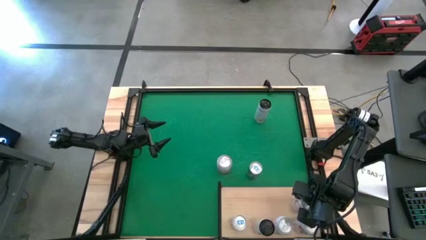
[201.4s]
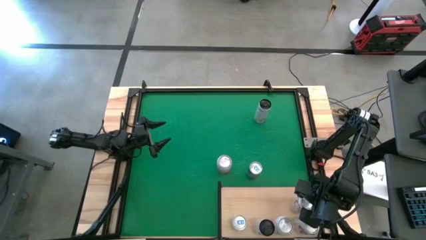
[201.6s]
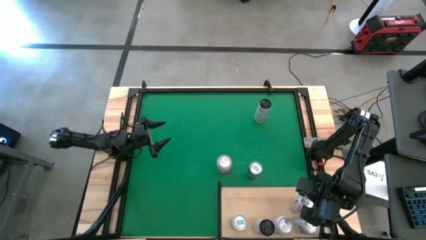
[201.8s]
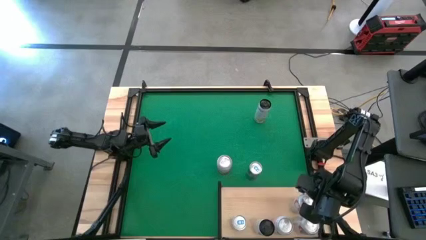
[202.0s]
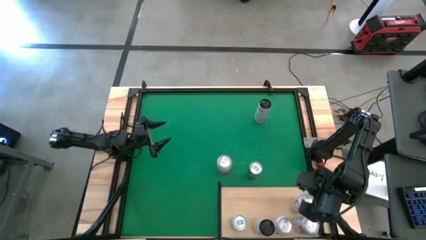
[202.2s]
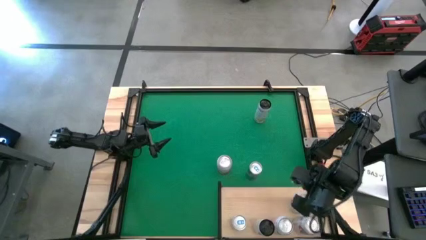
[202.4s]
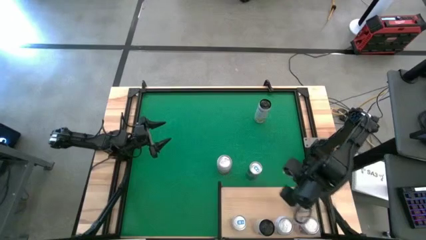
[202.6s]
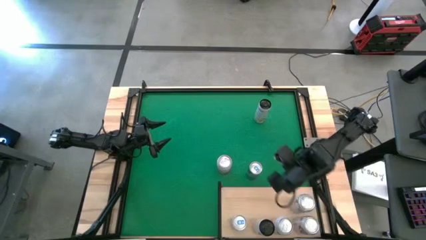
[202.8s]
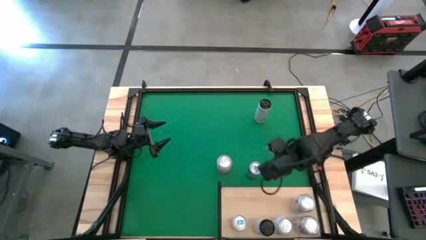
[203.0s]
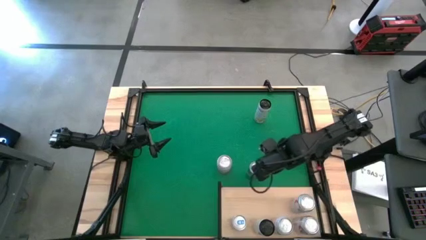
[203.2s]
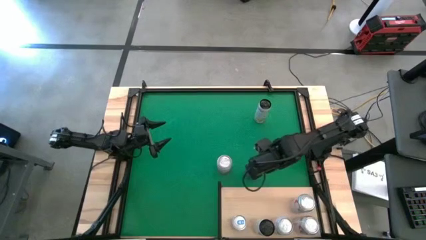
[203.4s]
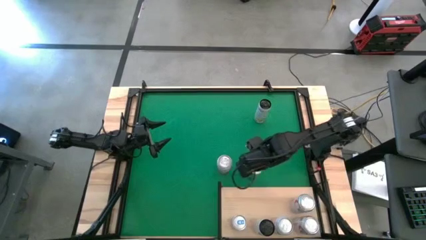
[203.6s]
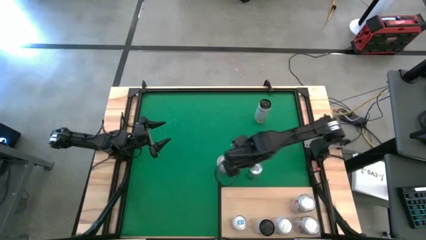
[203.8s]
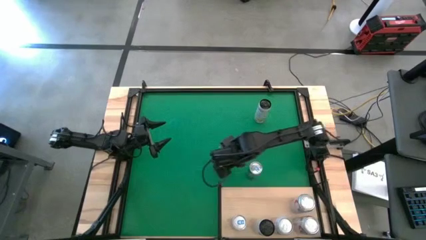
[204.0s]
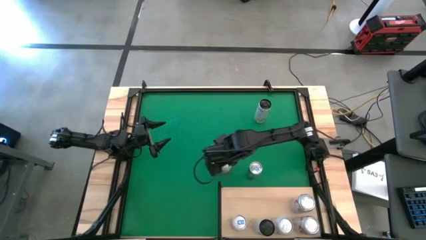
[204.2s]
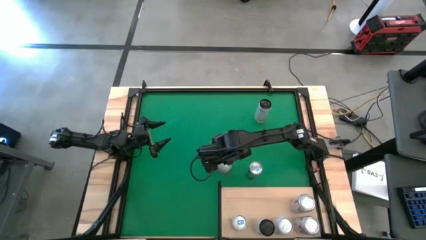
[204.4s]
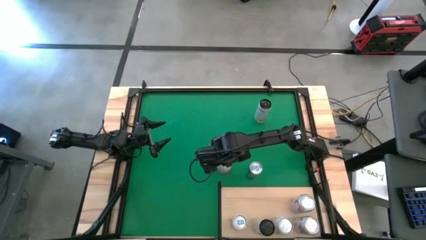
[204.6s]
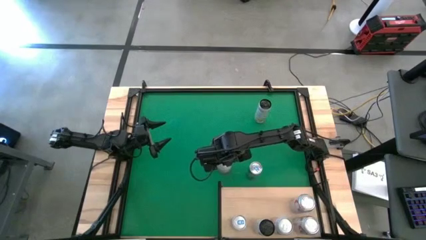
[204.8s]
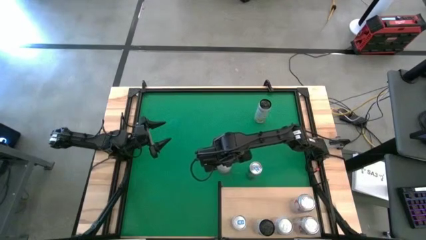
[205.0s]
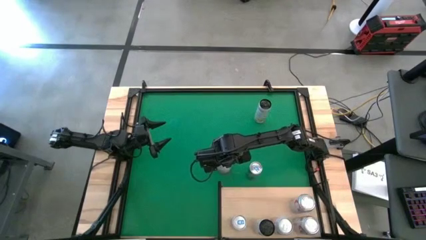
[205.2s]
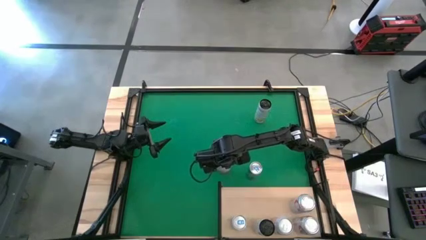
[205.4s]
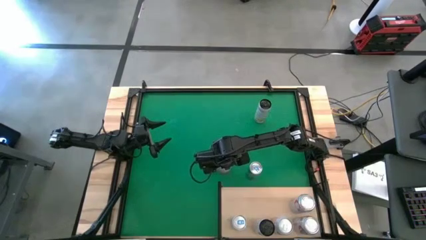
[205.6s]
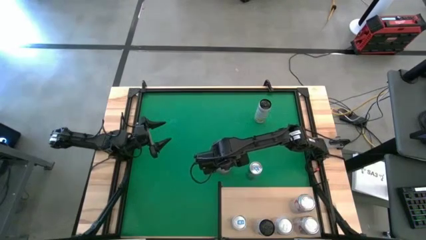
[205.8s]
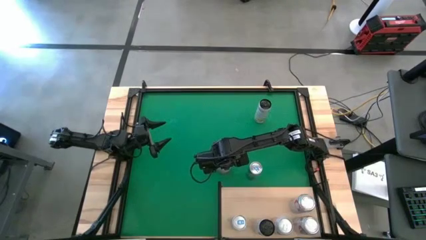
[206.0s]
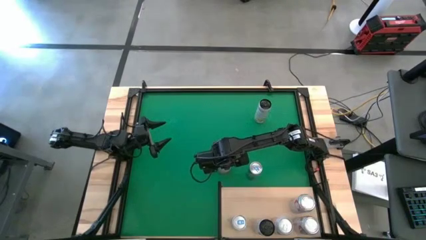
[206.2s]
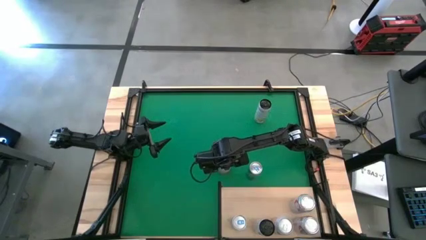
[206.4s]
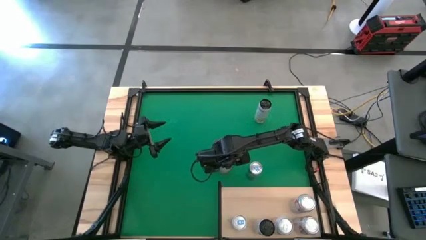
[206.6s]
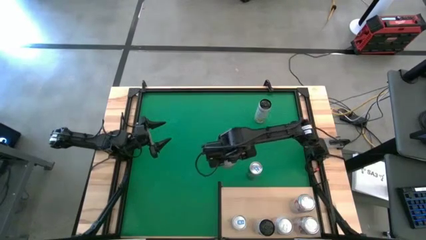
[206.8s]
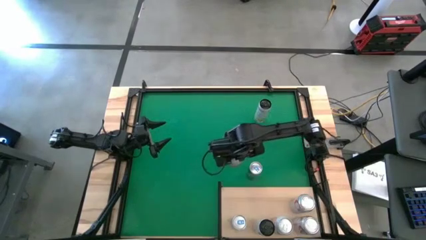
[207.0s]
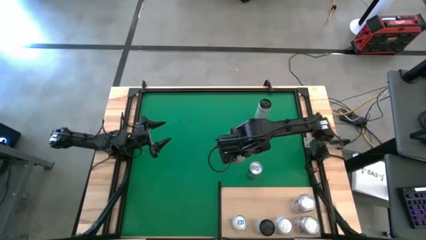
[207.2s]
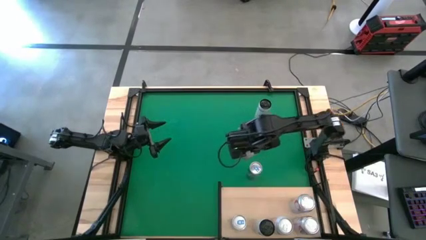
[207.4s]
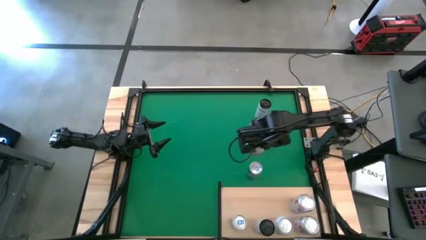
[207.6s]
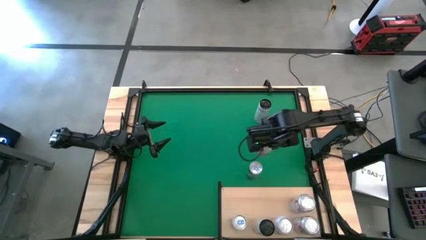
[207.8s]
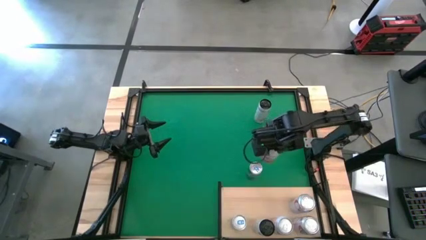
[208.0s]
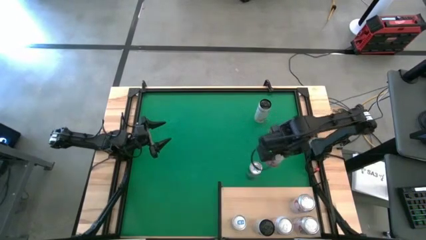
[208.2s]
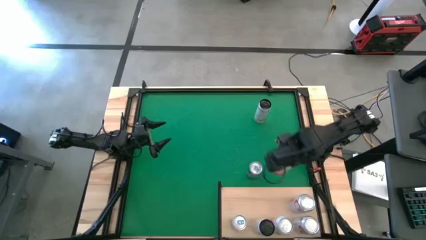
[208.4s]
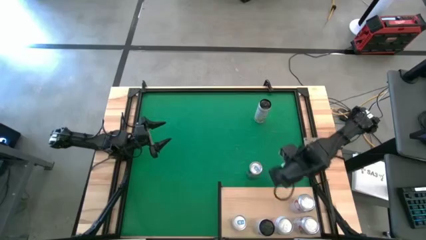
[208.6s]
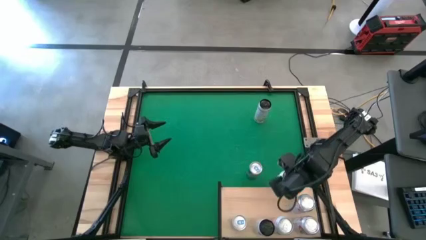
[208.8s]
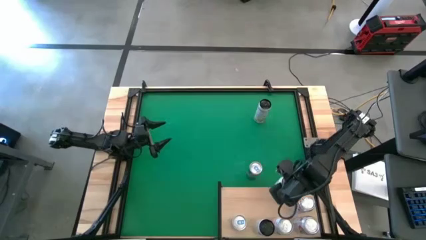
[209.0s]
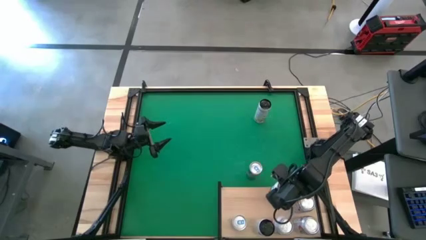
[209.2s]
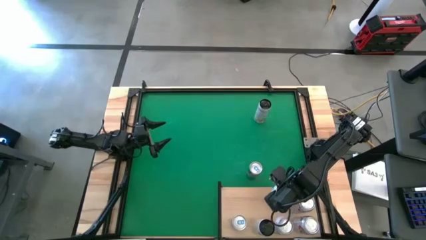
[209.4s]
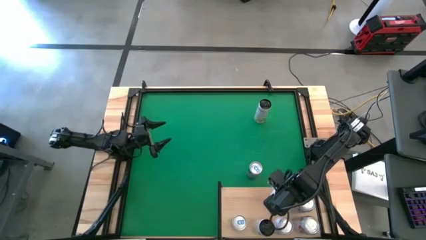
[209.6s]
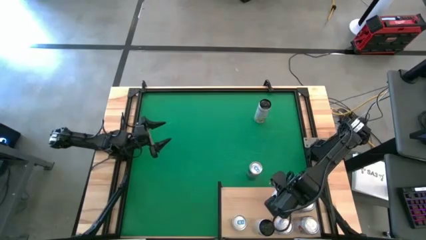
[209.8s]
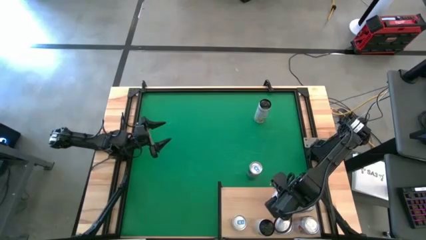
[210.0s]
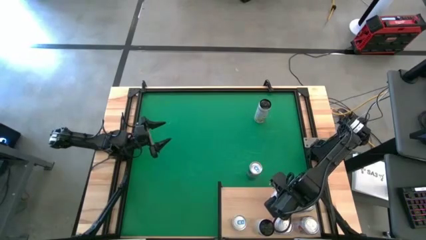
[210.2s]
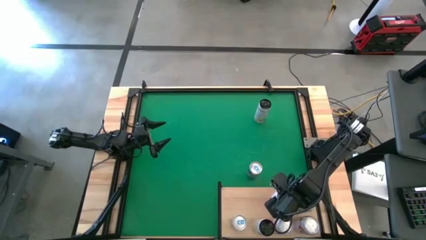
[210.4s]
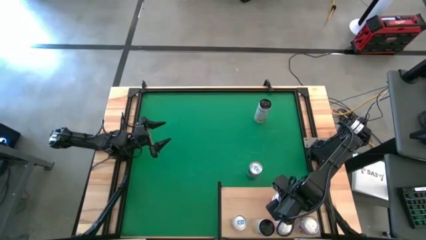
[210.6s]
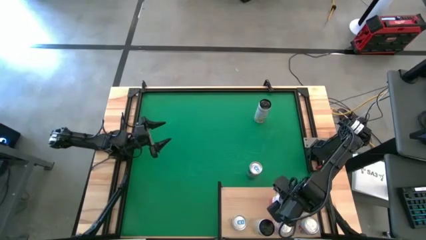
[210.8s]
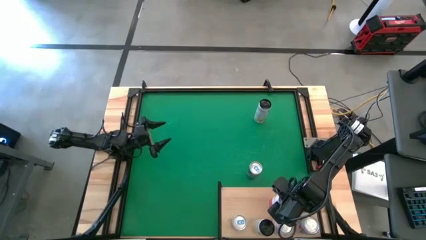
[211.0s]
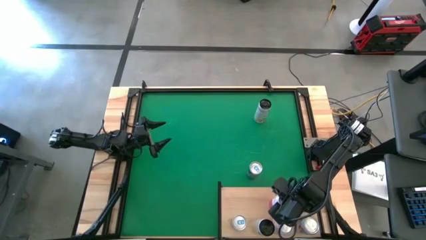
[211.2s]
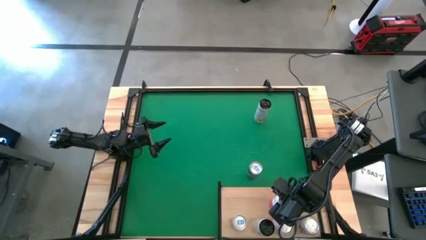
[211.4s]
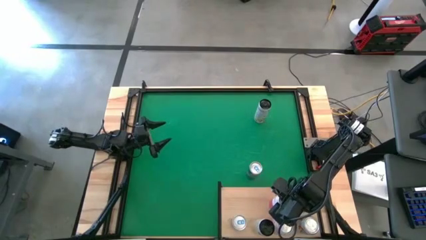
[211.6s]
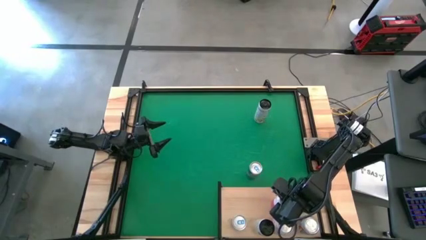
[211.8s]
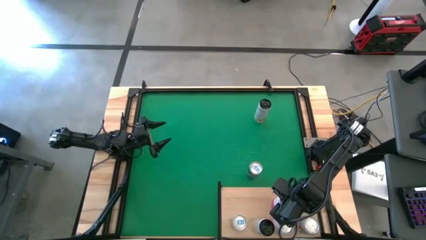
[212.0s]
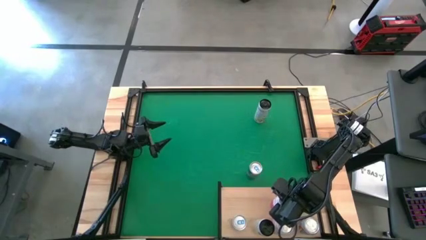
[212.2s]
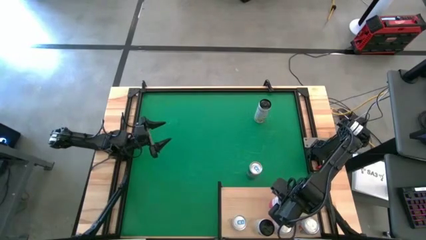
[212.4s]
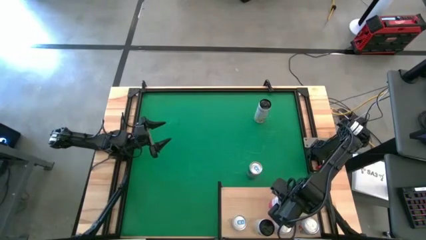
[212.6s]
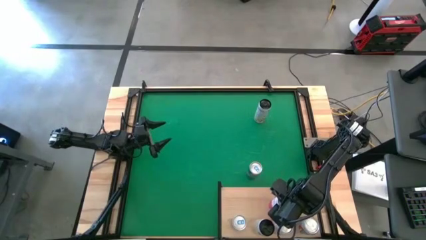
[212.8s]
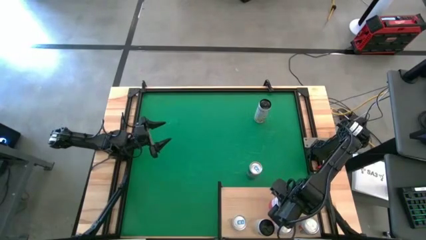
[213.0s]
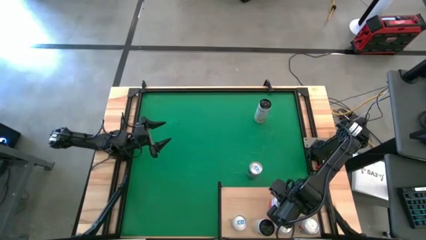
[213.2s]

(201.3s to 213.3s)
Task: Place canned beverage on shelf
Put the pink-white soda can aligned with the pink-white soda can on the shelf

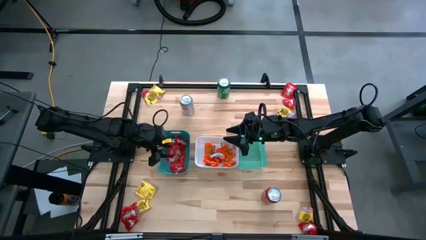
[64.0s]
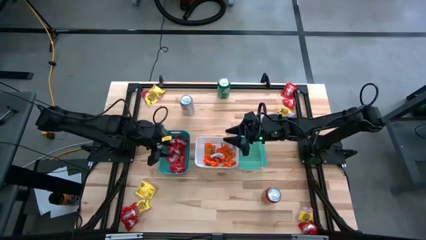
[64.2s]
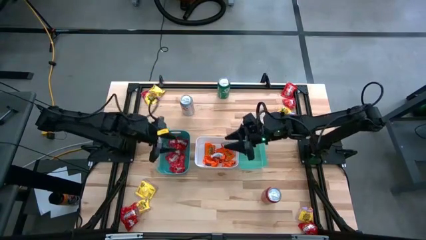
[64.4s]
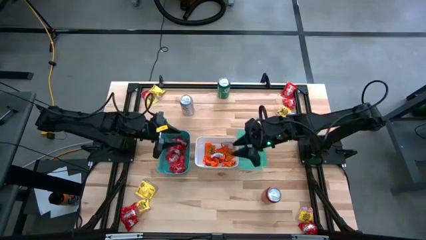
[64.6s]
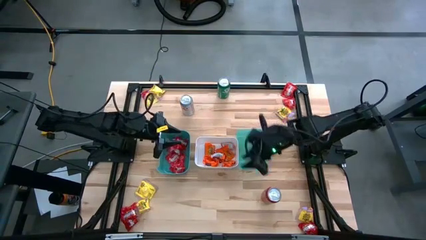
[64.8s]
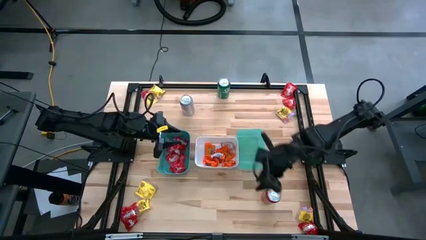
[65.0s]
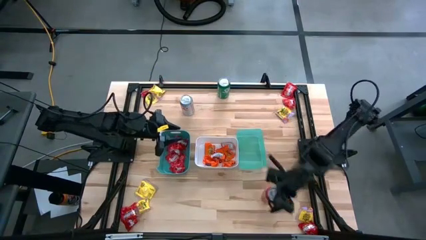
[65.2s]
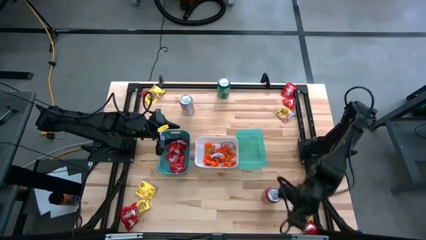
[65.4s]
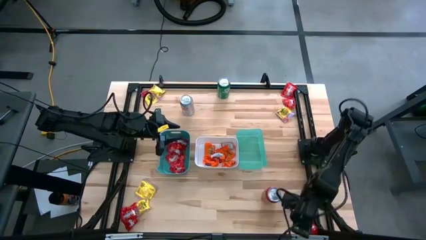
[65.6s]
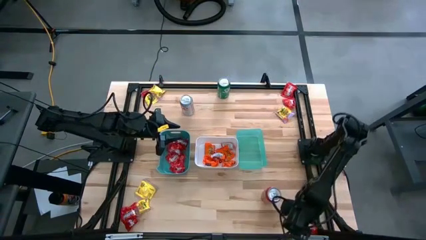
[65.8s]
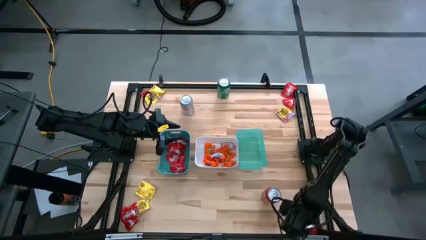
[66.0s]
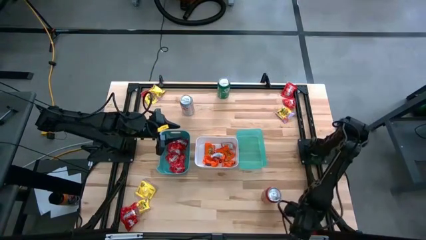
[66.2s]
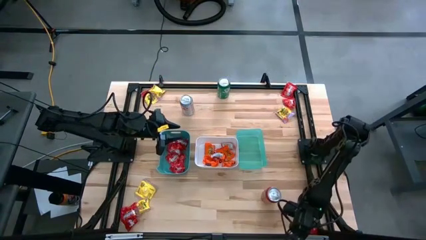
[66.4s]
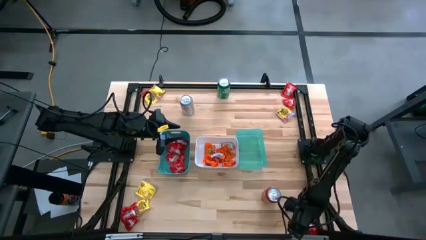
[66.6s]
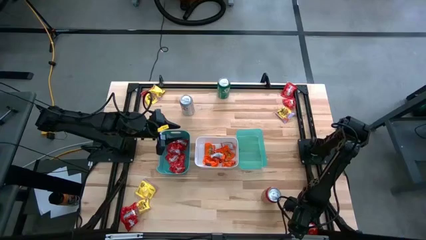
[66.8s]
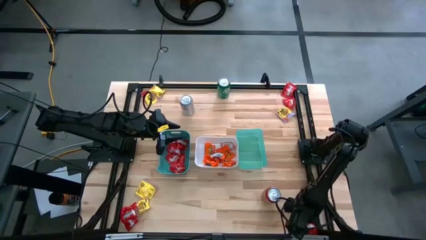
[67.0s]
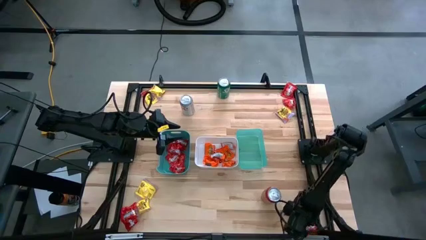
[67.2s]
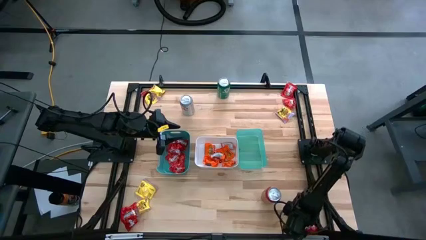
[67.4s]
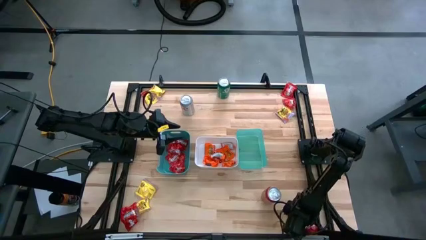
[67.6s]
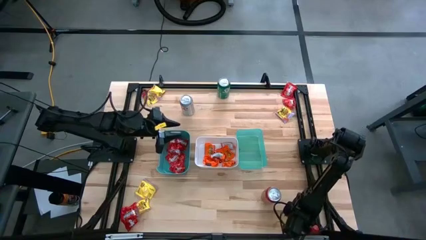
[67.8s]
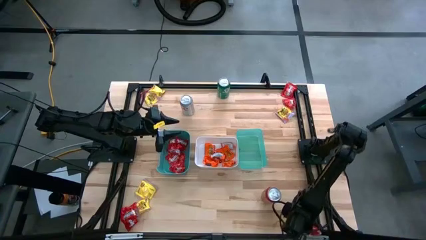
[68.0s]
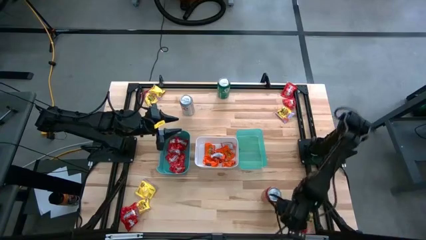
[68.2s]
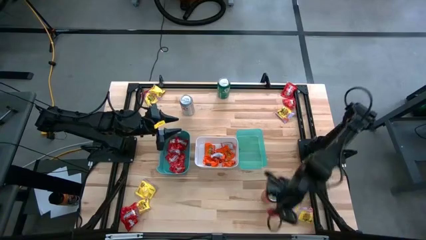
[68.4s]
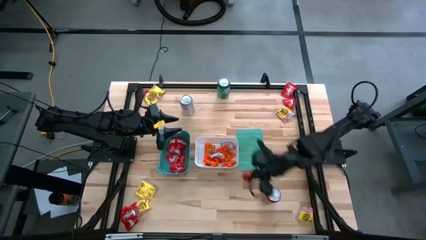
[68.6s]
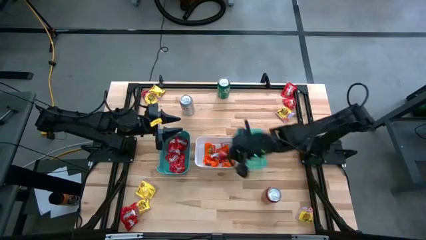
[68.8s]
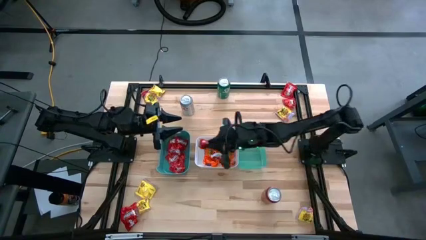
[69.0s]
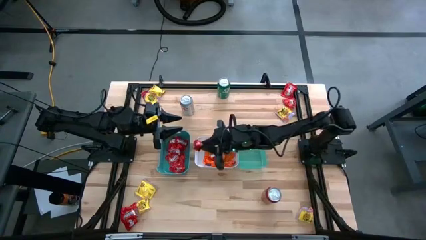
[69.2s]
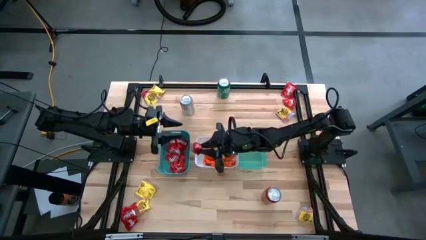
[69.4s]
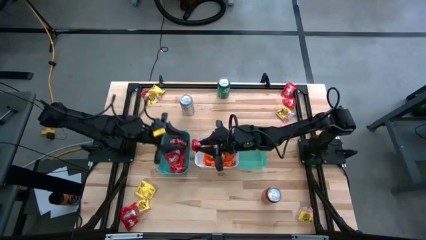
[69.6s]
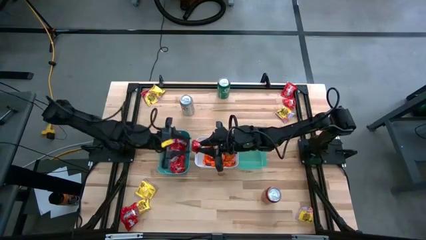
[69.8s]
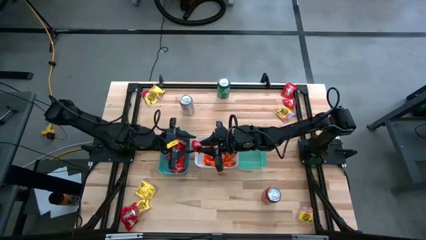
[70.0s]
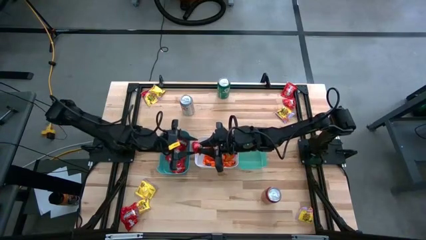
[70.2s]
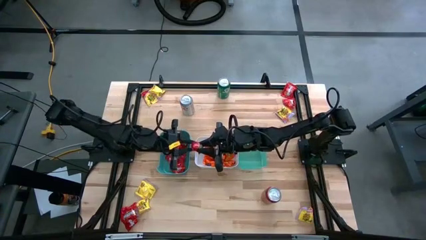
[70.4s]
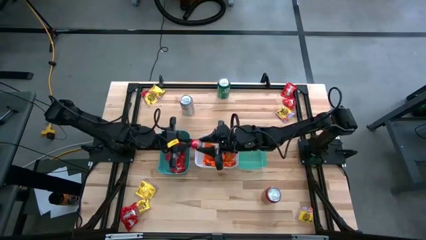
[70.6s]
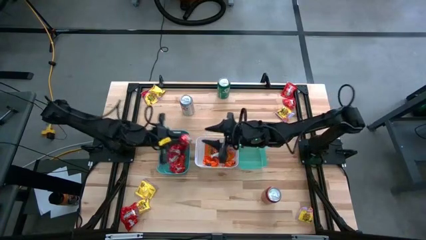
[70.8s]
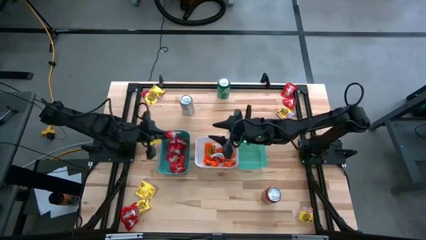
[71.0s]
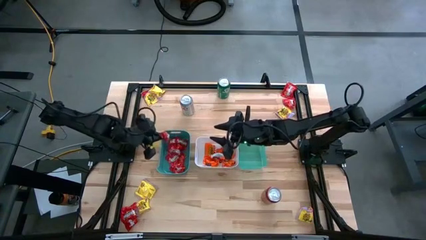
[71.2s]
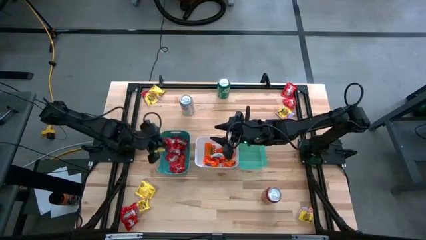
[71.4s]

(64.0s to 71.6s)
Task: Sort candy
Put the red candy into the green bin
